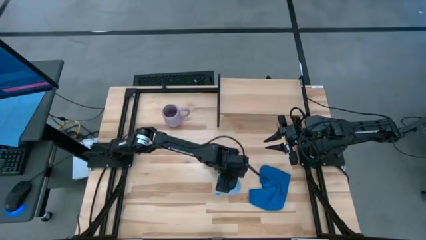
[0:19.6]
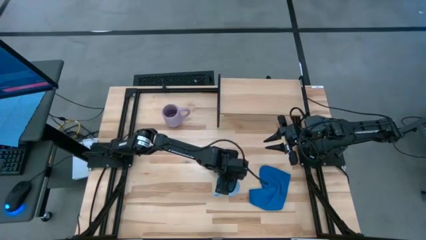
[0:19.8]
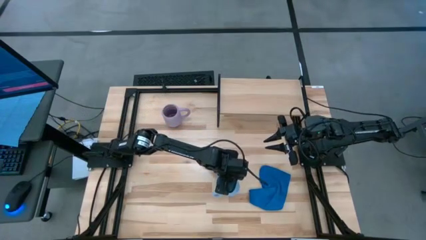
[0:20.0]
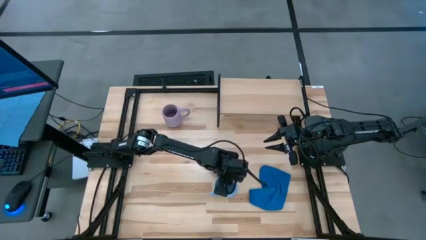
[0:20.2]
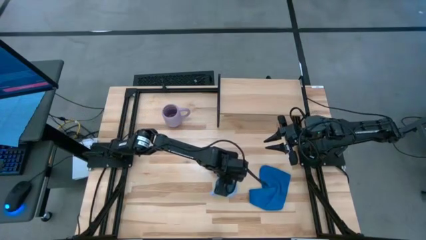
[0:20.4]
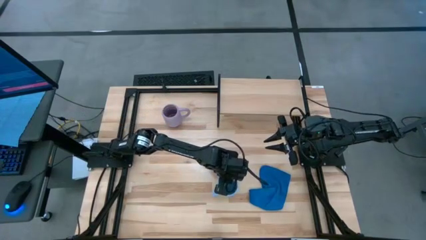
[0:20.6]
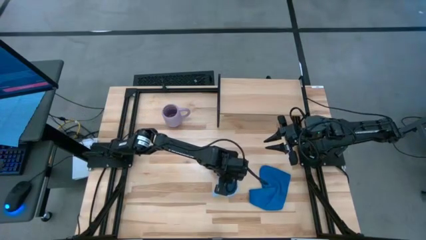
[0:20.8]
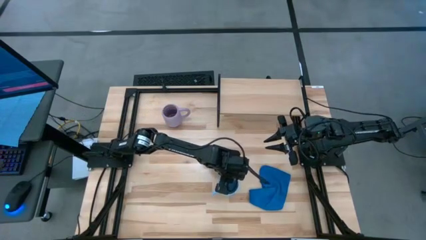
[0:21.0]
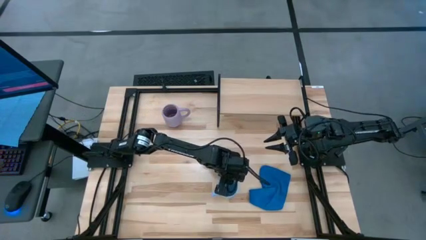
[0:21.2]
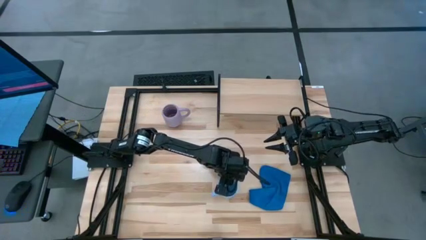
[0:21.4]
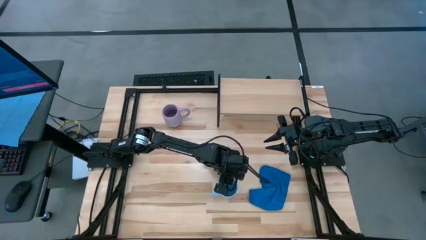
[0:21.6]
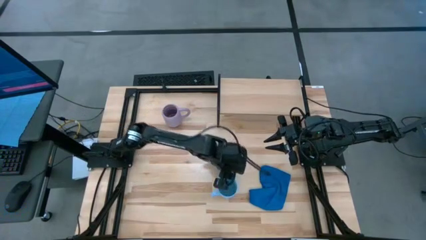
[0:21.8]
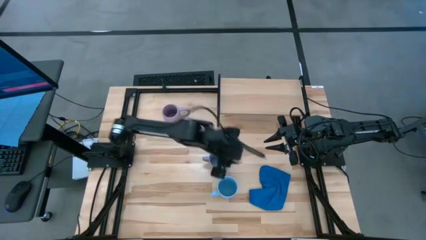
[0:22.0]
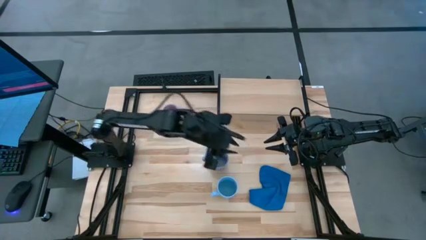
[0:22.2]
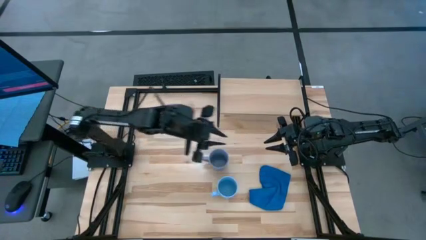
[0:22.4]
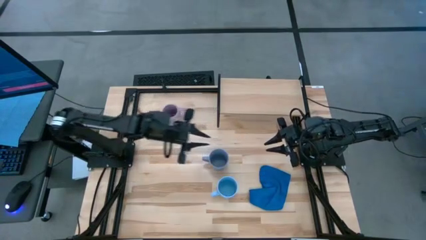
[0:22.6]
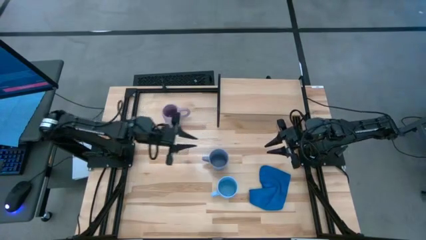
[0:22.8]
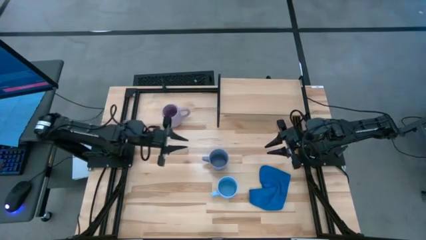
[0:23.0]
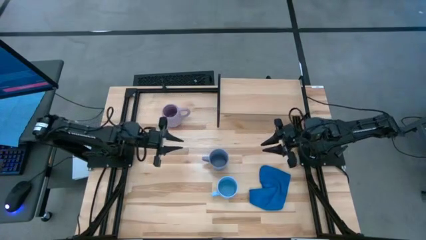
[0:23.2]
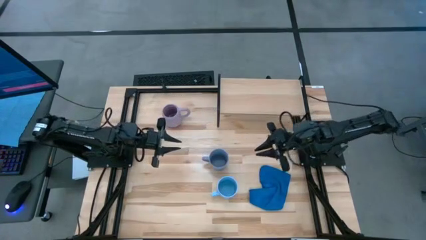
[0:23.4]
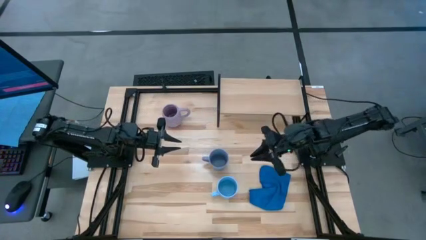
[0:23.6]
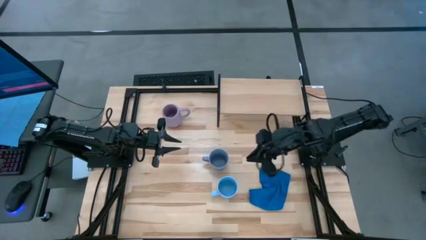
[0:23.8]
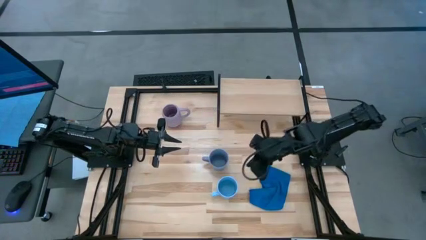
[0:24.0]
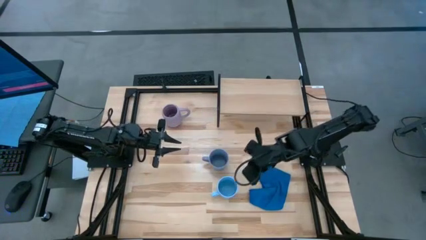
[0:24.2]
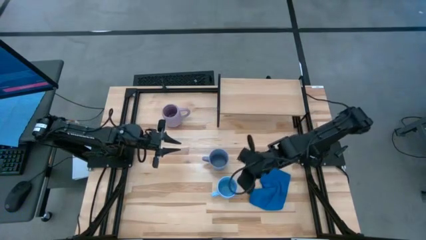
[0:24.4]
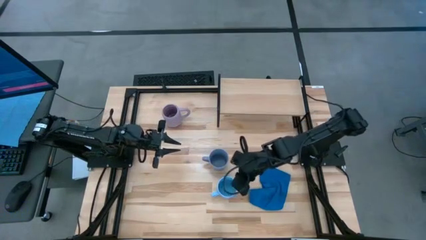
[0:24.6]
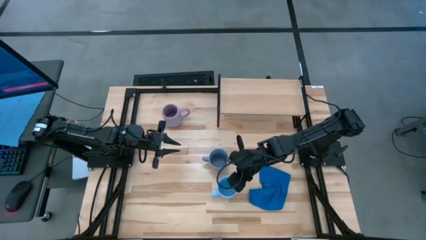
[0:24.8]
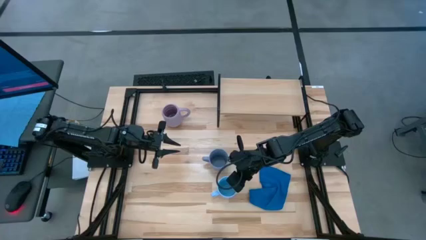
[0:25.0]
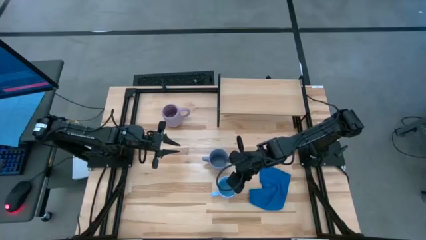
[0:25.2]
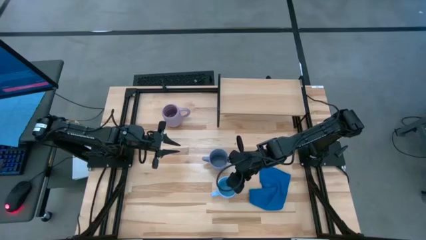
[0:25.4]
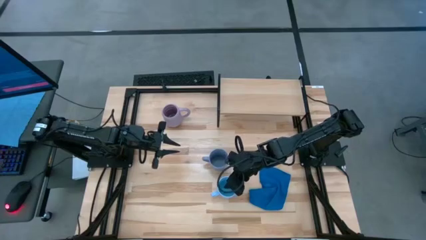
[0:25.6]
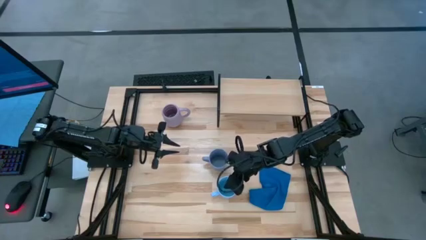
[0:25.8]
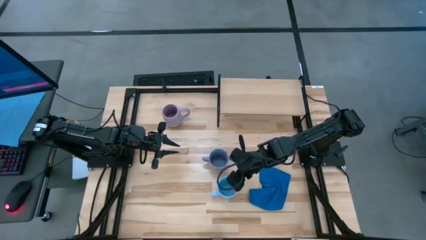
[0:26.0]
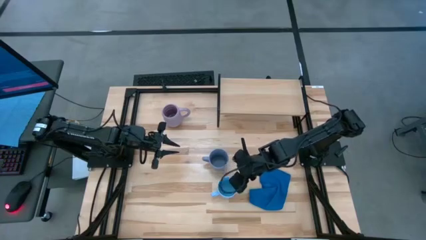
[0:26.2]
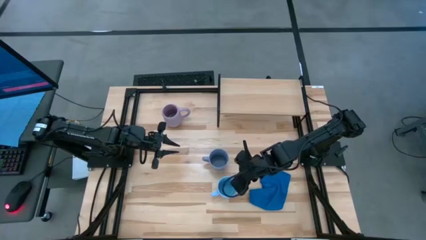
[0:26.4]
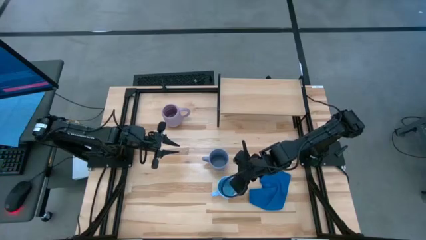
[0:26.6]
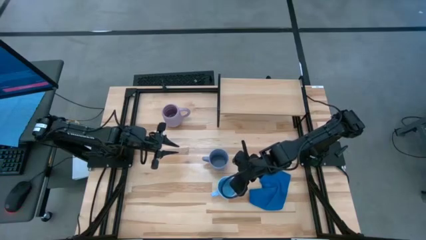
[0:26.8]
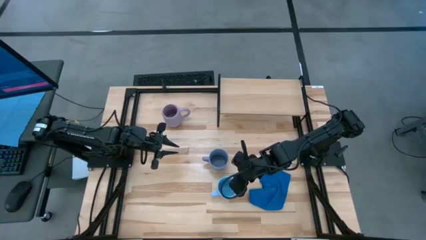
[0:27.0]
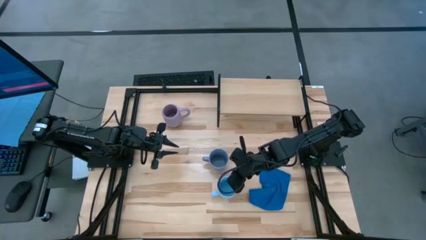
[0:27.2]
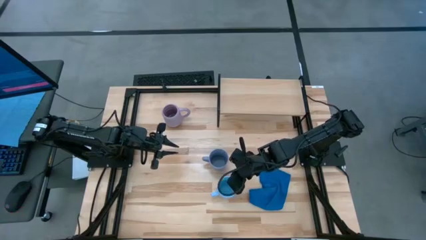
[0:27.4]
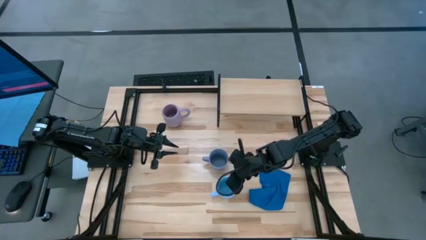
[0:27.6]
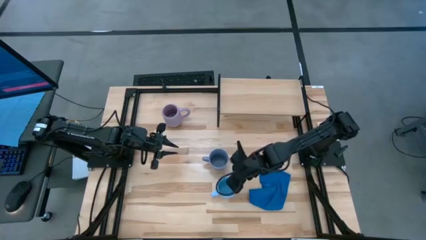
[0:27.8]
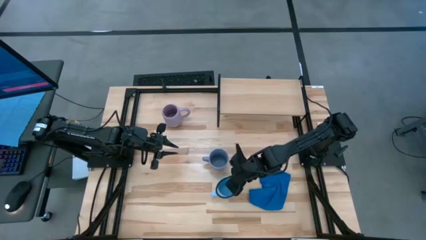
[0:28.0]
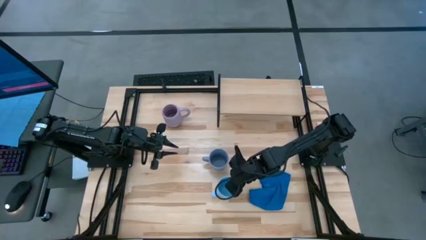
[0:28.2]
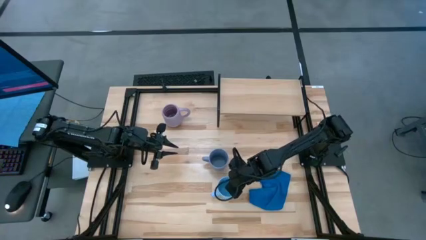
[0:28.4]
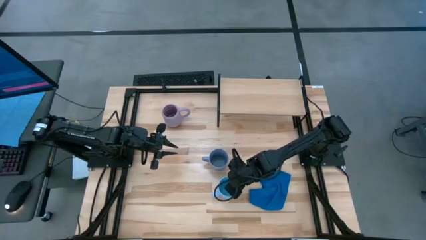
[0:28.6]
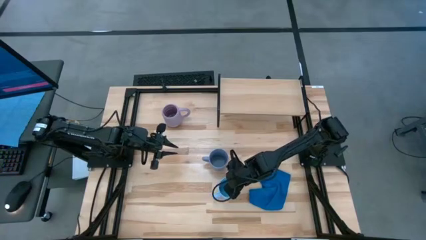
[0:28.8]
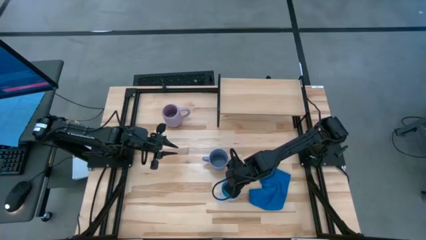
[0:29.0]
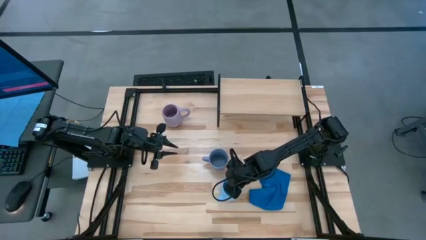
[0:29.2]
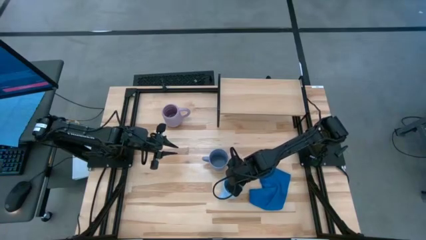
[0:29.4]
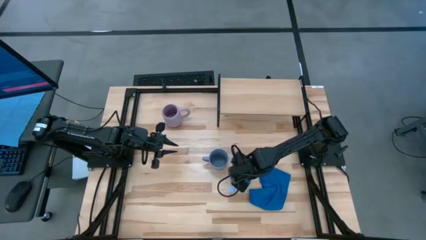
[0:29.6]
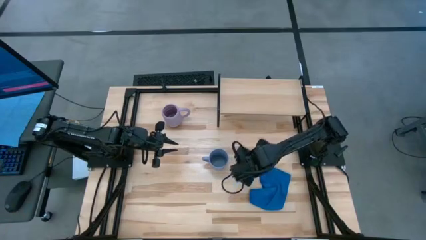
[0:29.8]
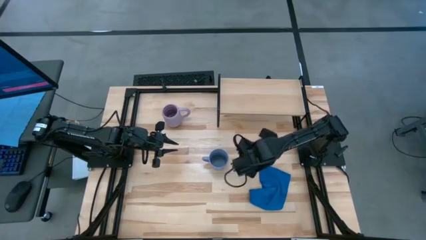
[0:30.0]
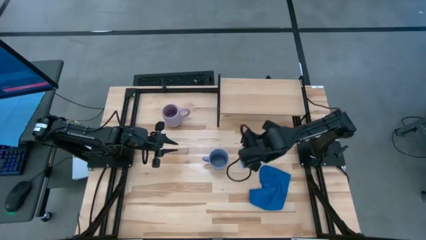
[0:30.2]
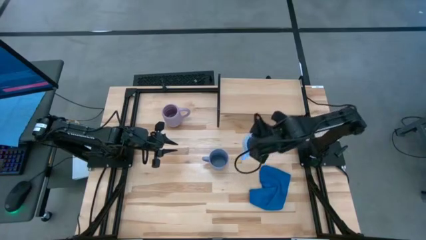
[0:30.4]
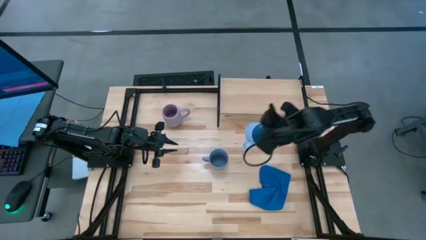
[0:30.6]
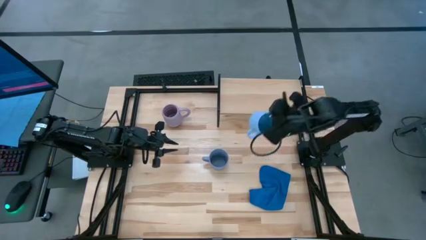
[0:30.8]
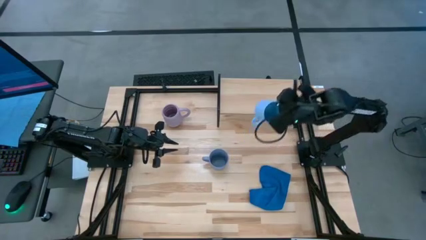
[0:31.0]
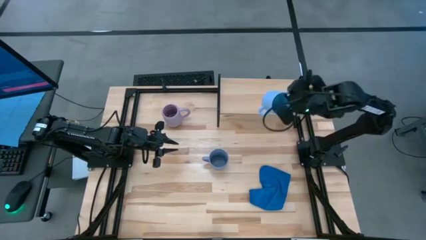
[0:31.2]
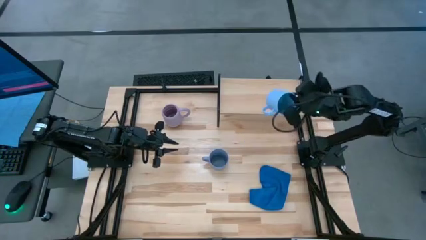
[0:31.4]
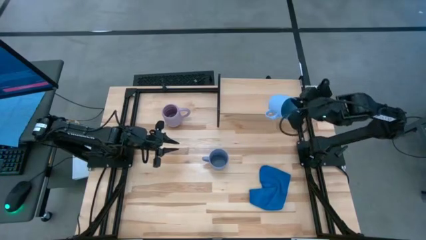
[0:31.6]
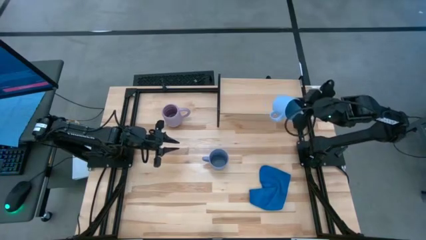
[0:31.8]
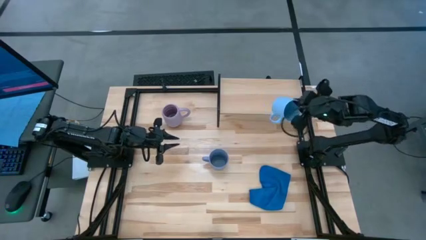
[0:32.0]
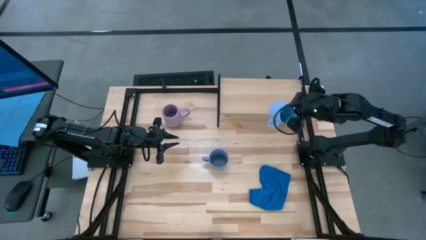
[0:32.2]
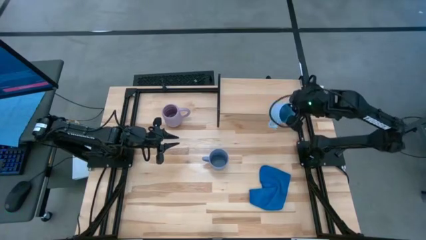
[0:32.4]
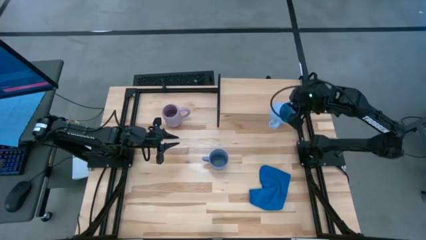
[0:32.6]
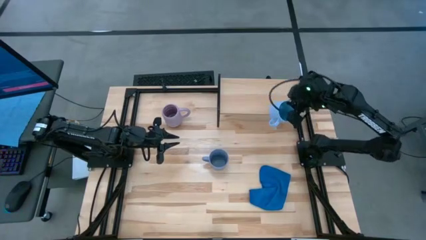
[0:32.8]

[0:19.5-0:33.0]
Task: Stack small to large cups/mugs on shelf
Put the light blue mug on the shelf

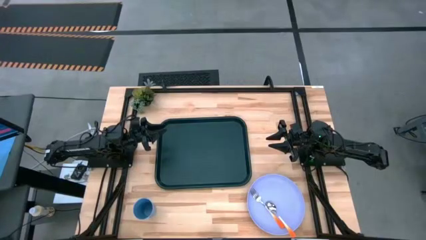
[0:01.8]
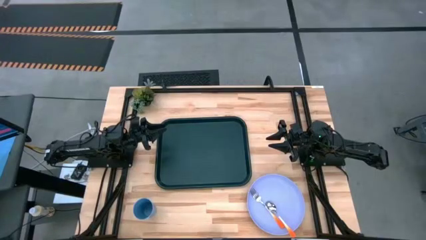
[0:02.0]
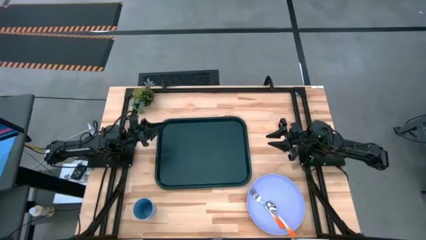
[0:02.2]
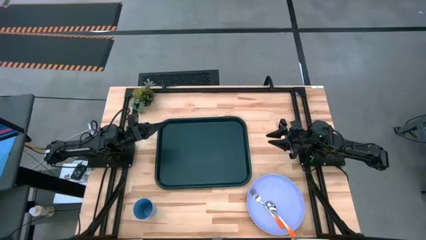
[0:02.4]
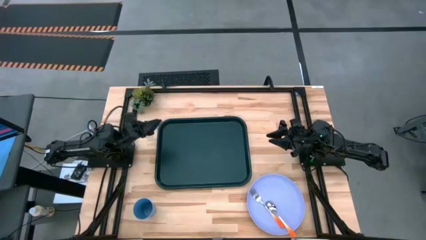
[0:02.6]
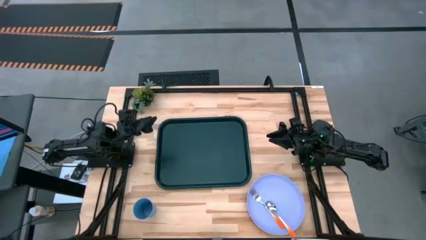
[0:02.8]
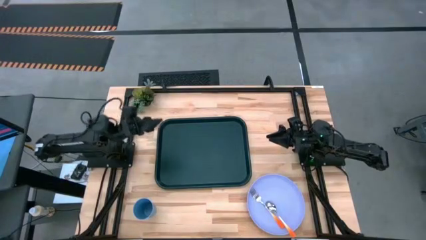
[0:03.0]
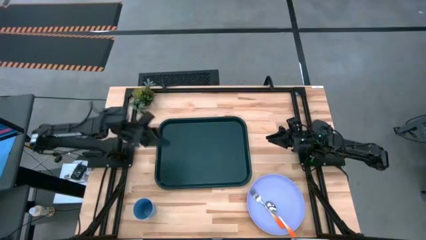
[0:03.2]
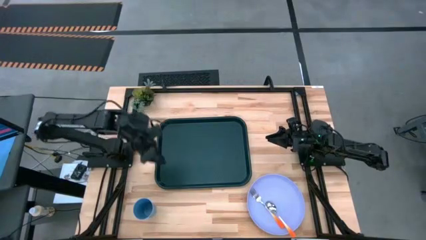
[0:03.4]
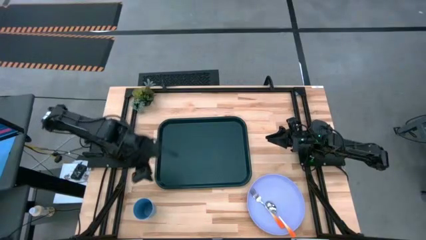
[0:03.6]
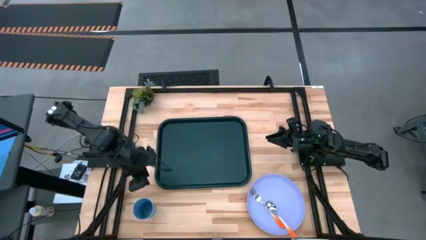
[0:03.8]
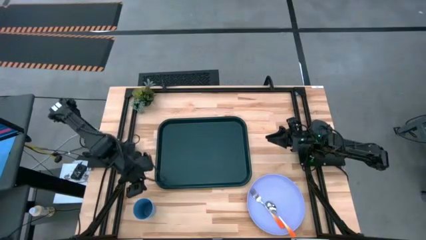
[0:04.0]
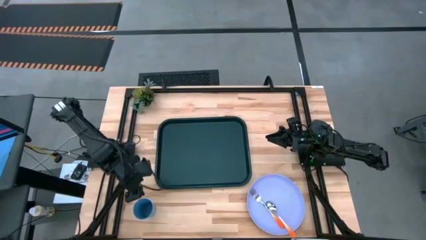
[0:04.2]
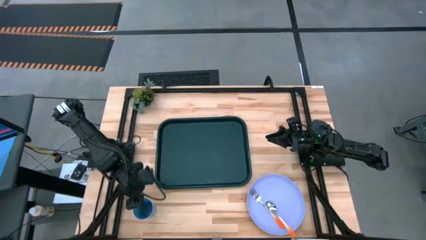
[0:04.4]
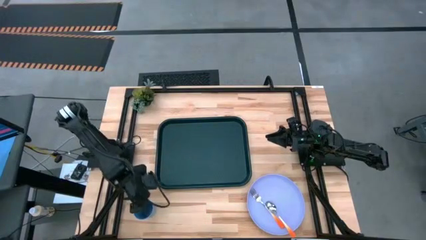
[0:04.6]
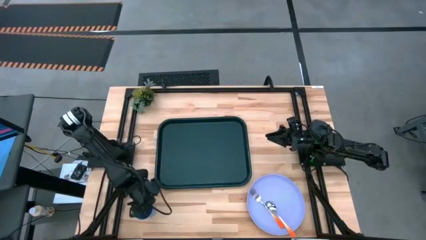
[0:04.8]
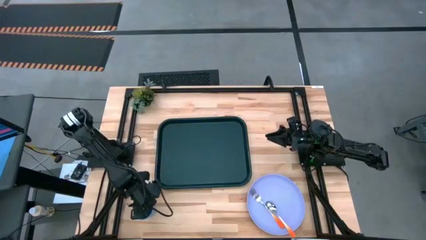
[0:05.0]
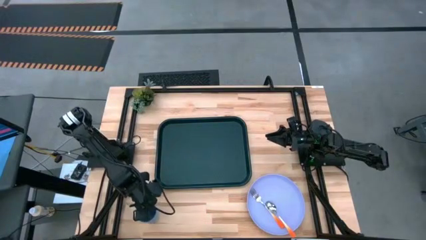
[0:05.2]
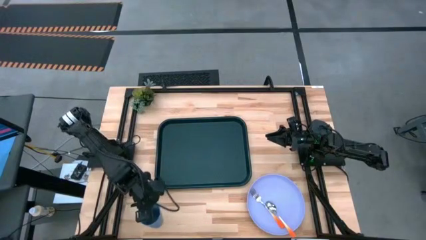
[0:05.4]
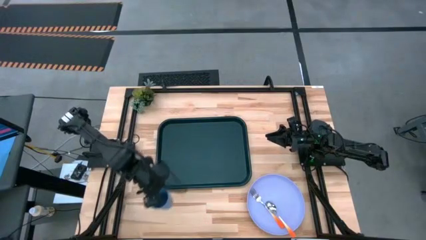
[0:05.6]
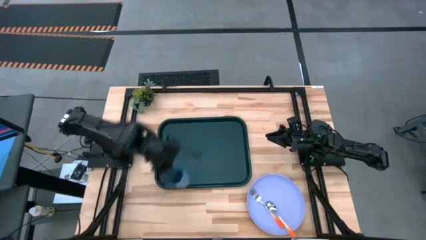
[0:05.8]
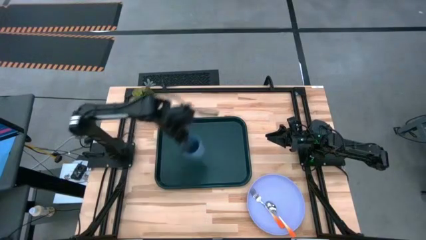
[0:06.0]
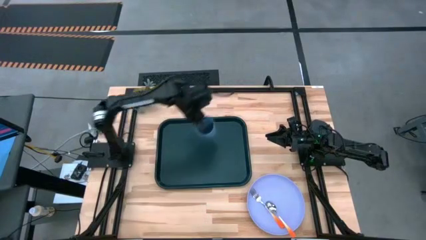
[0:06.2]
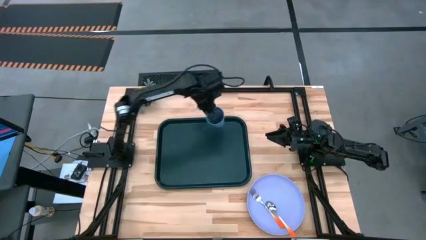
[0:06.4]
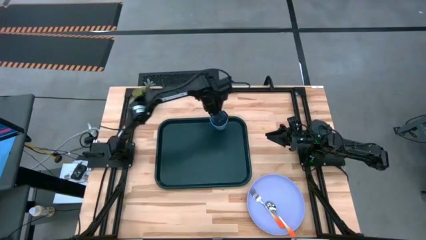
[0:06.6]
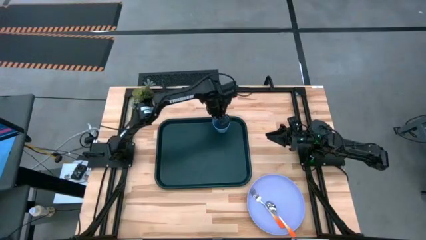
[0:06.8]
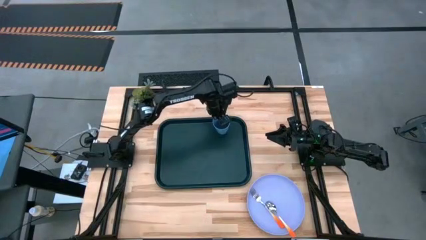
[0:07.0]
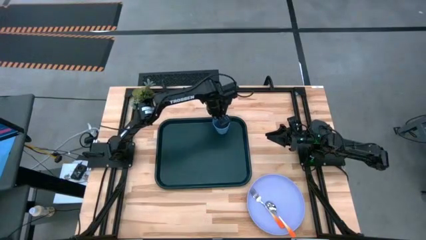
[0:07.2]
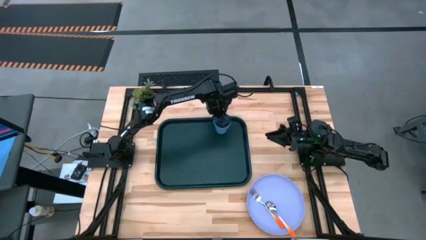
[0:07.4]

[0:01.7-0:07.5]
Task: Pick and place plate/cup/fork/spoon on tray
Put the blue cup on the black tray
